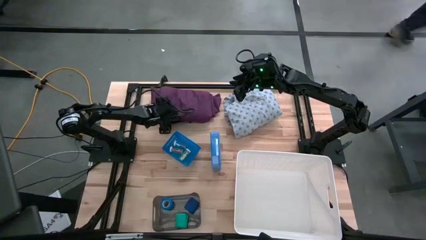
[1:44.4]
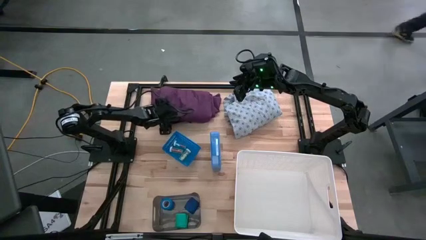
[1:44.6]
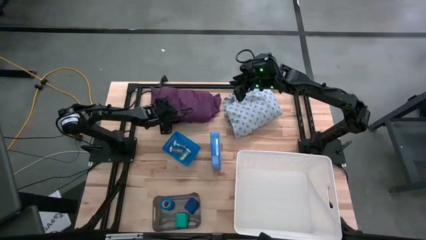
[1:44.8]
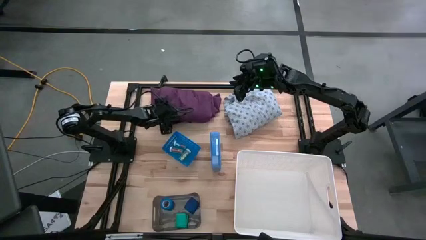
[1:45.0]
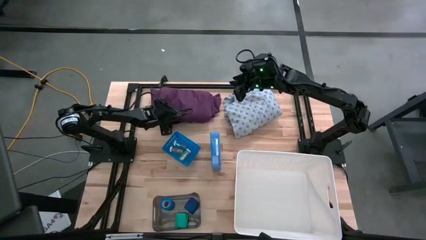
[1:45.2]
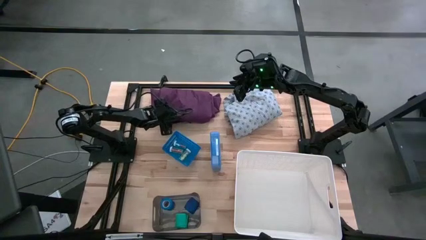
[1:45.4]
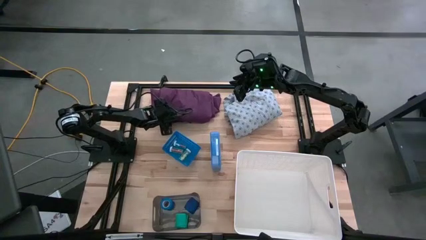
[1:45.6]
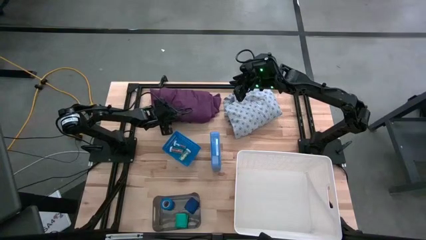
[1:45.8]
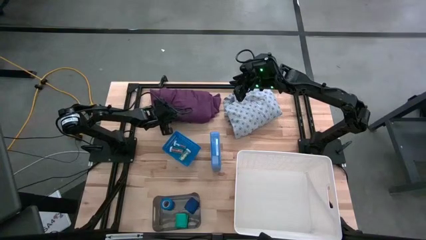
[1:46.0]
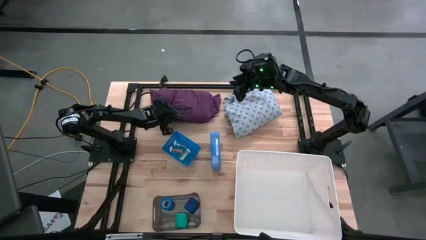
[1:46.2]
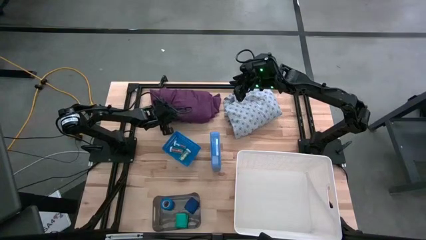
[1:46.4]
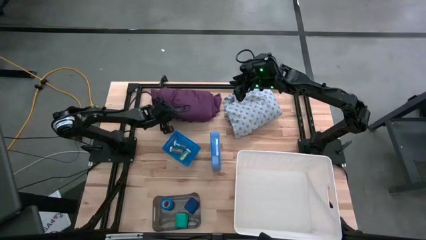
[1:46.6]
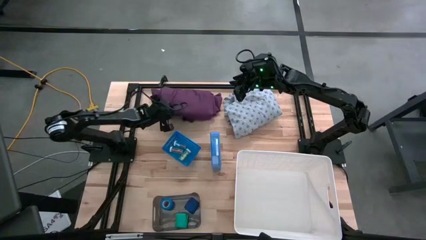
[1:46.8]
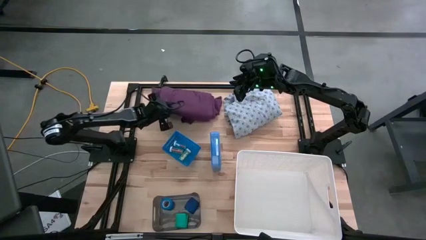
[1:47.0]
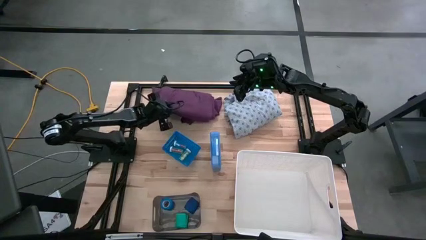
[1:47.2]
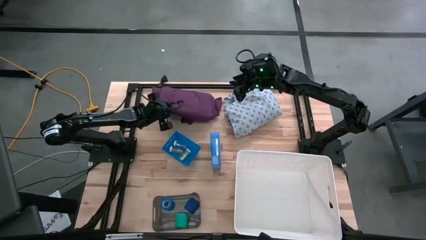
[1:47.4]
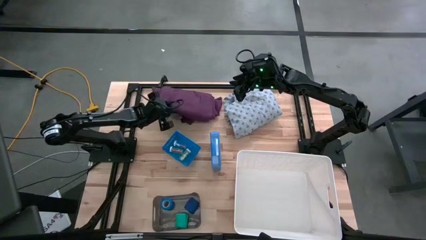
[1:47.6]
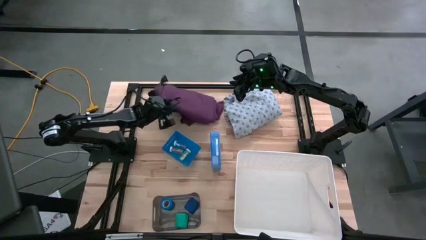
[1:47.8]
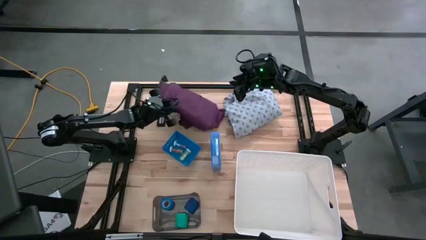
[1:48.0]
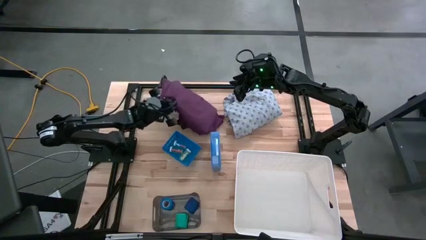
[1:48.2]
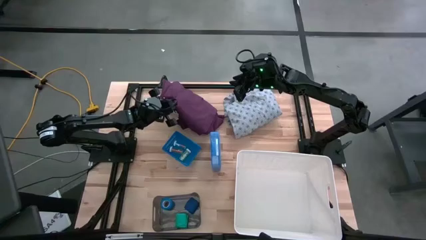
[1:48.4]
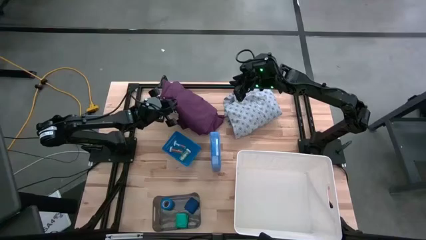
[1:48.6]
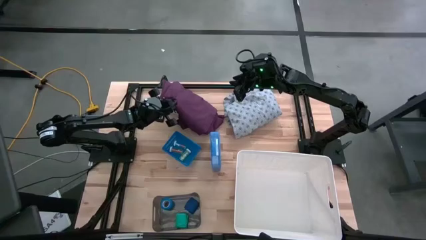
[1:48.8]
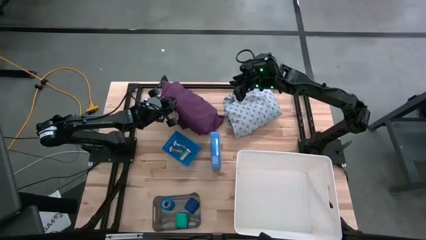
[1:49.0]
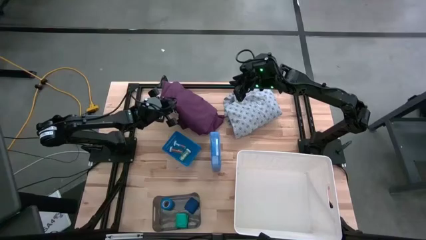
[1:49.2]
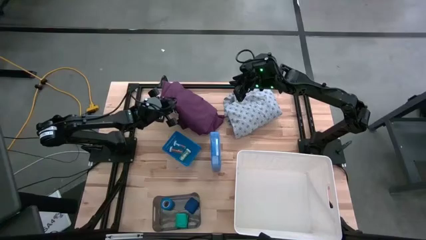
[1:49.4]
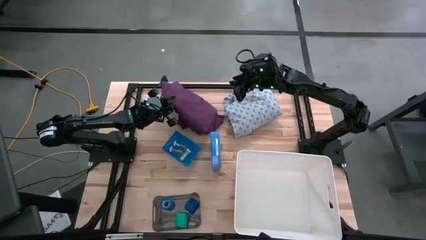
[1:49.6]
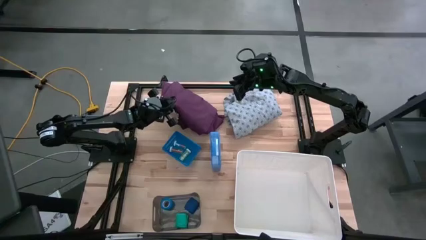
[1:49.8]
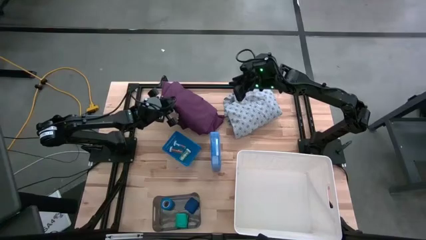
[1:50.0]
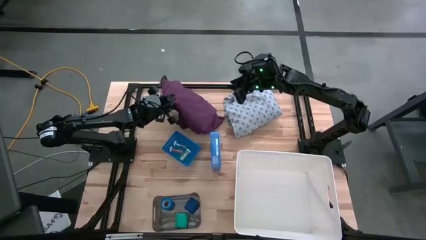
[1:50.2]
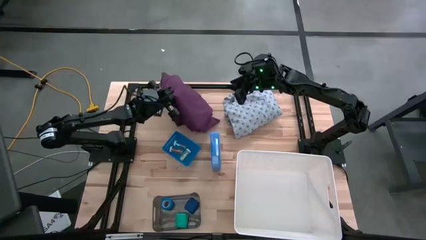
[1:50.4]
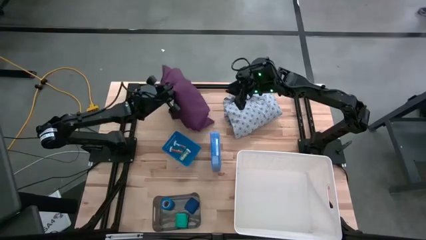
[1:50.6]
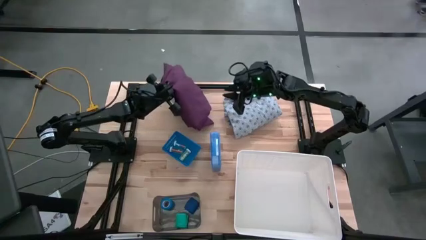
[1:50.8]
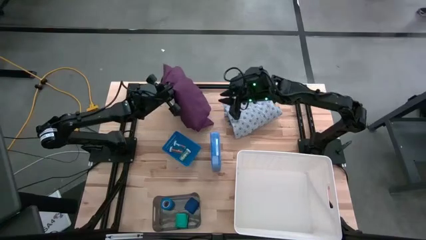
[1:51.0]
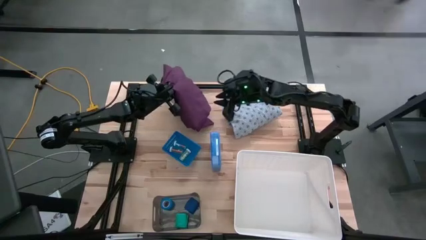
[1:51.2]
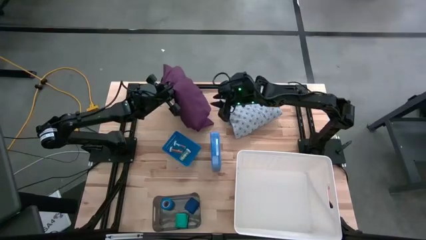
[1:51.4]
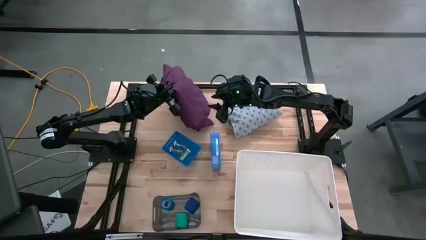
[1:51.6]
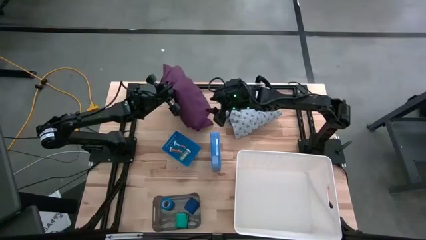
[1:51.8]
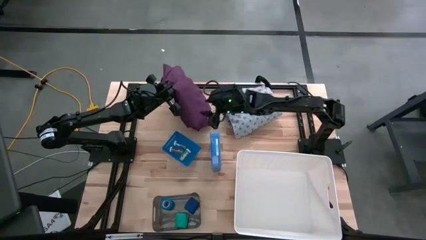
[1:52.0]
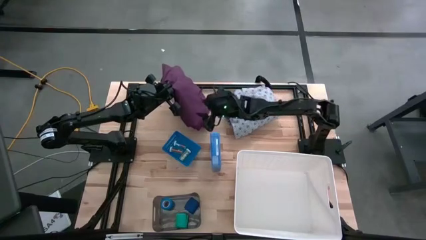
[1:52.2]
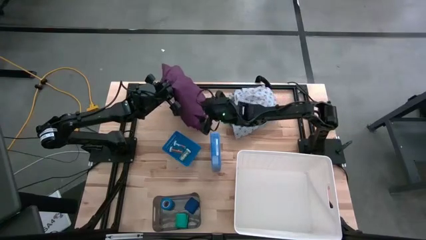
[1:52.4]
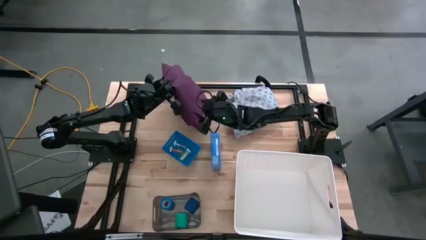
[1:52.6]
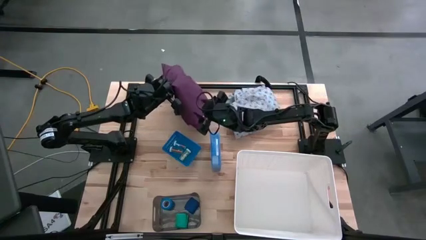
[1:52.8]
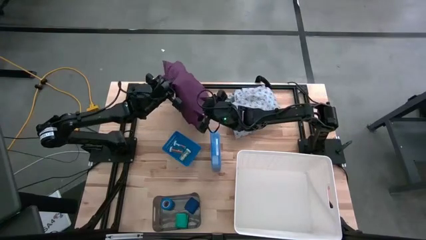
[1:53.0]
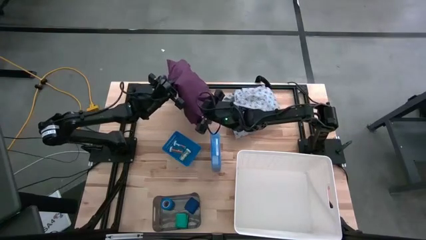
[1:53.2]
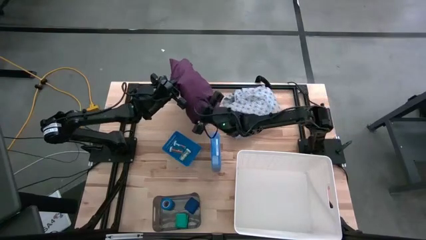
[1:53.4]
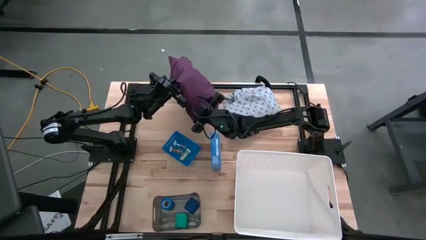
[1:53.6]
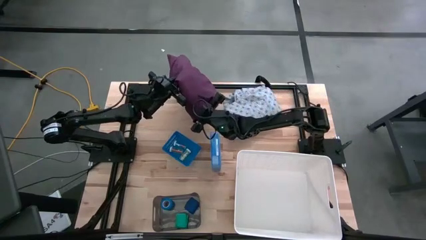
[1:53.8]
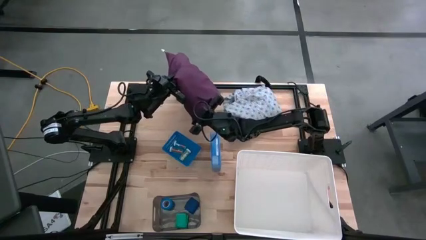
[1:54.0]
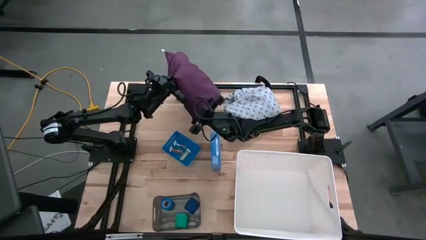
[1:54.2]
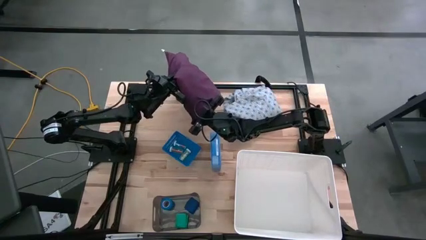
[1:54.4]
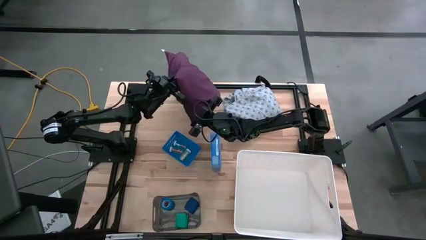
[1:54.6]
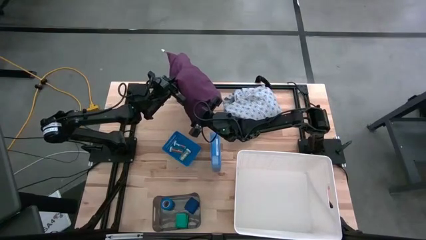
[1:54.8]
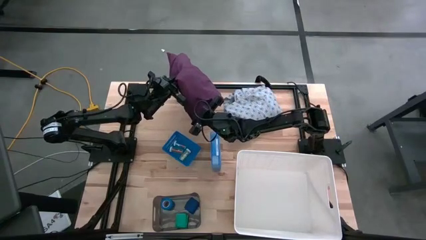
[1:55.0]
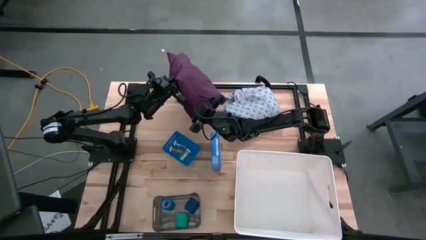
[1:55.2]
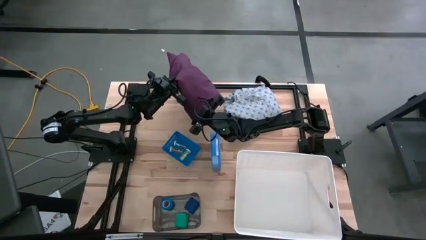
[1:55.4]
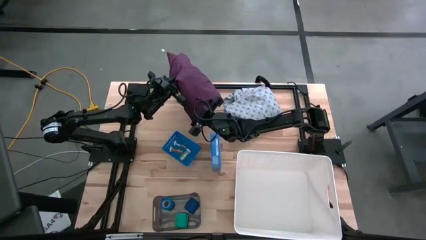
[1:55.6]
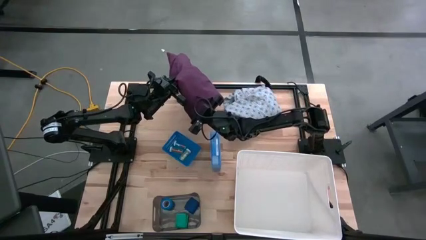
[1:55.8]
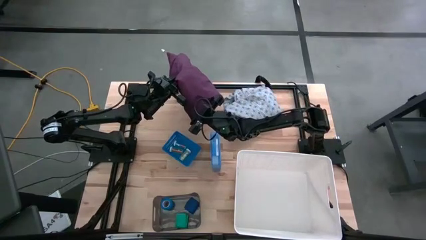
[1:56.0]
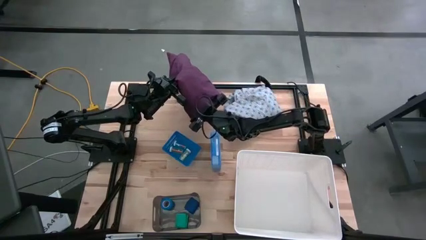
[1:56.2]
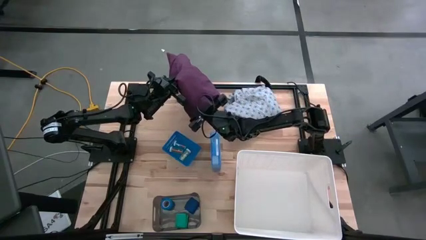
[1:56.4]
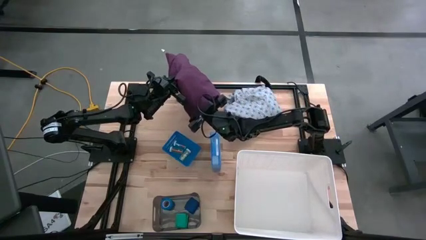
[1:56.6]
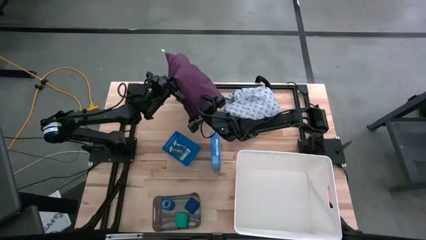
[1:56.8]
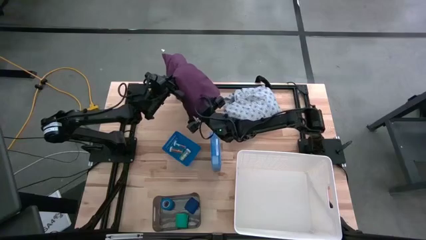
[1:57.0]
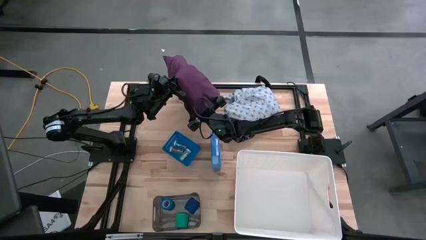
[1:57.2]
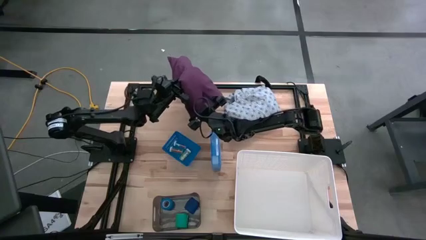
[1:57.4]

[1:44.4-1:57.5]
Task: Pick & Place Medicine items
Put the purple scrubs into the white bin
